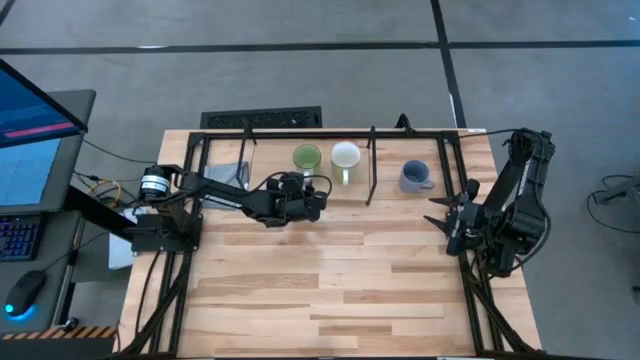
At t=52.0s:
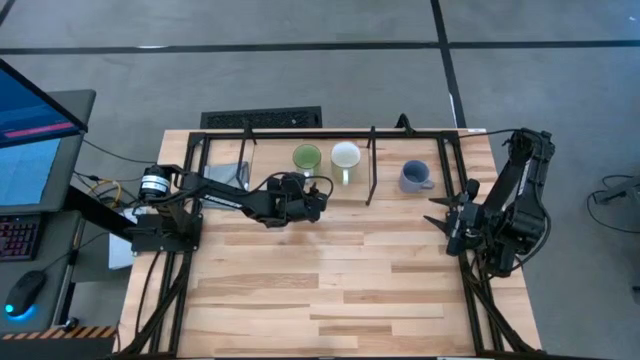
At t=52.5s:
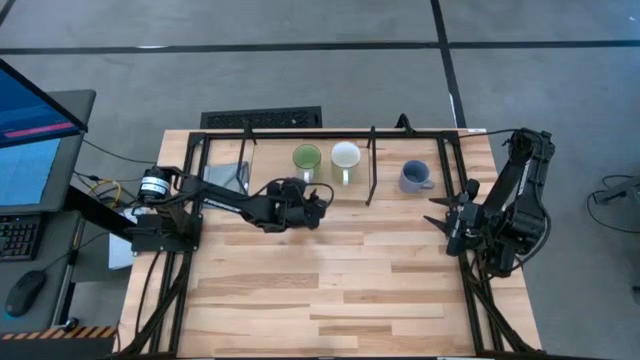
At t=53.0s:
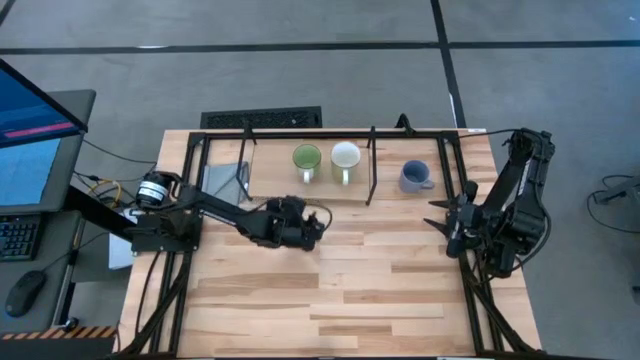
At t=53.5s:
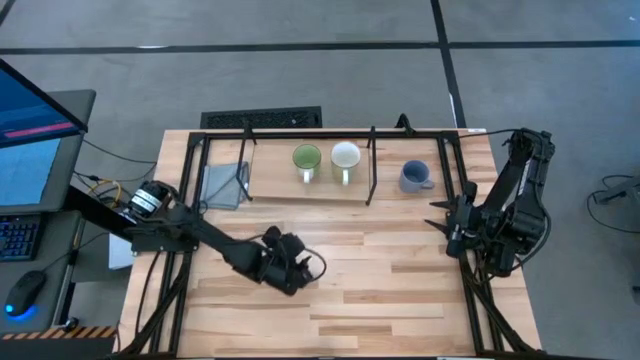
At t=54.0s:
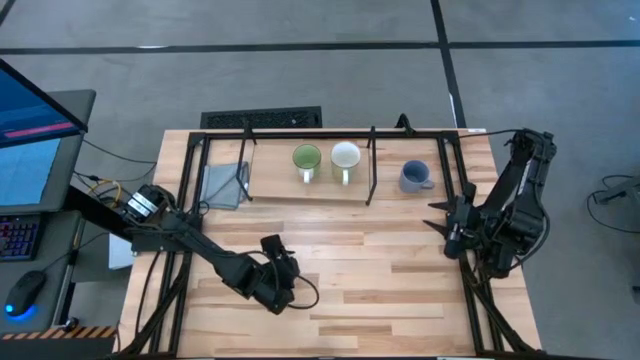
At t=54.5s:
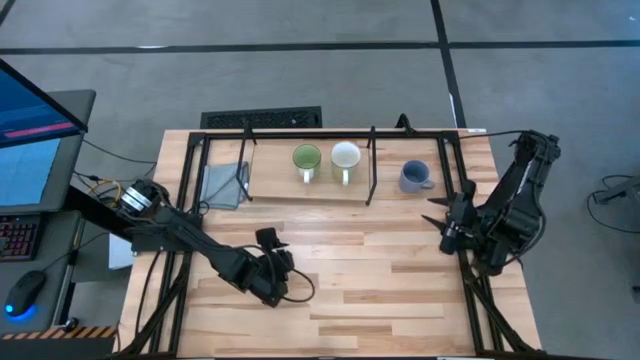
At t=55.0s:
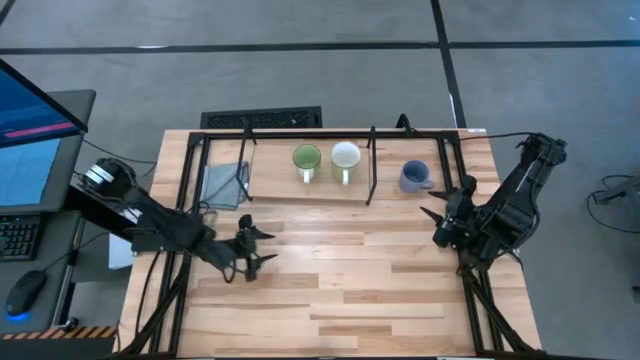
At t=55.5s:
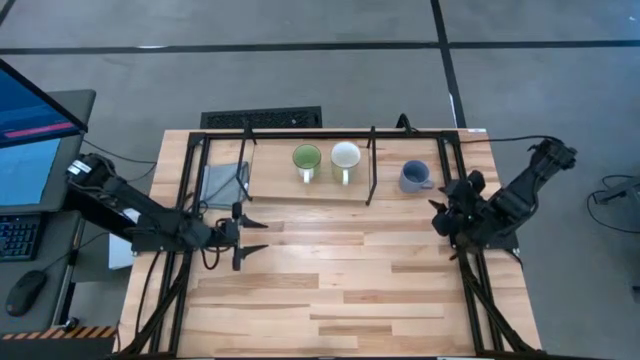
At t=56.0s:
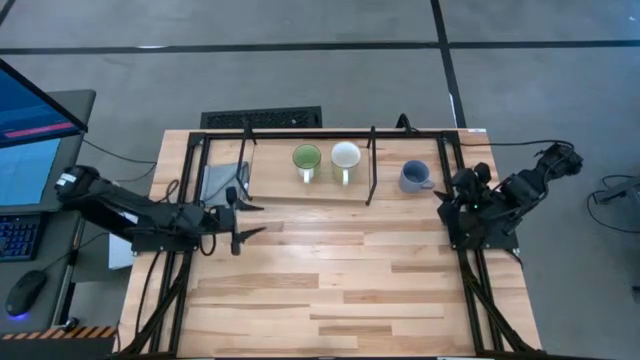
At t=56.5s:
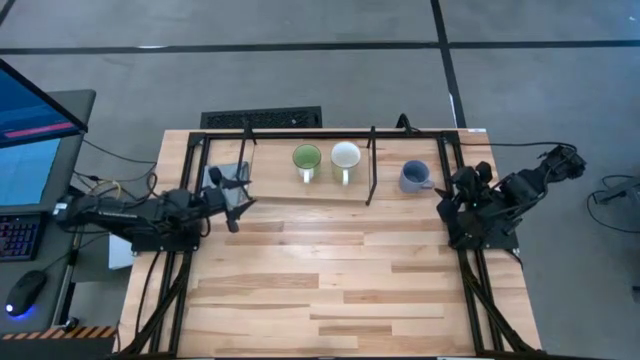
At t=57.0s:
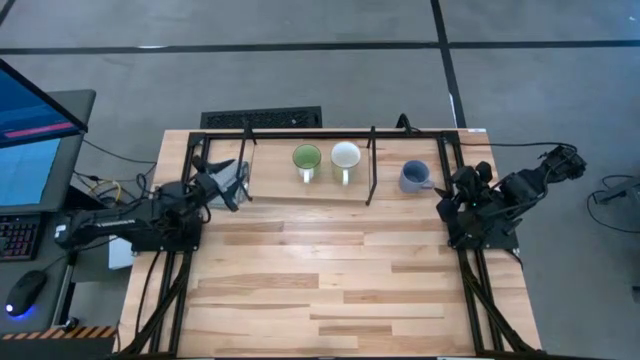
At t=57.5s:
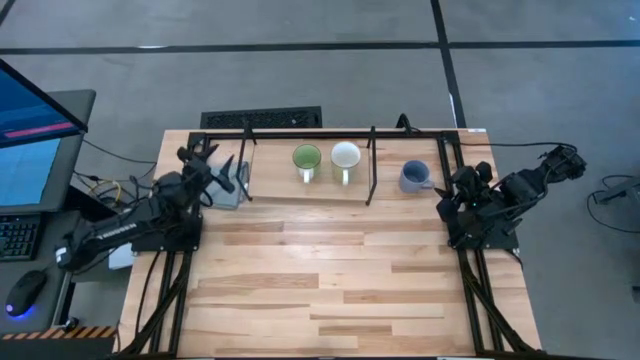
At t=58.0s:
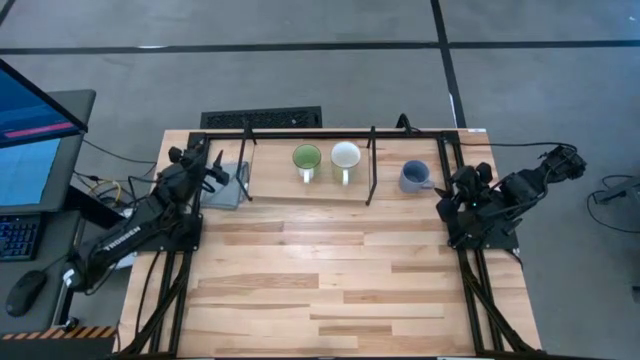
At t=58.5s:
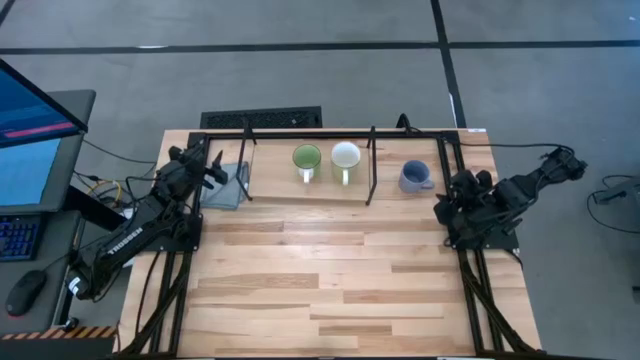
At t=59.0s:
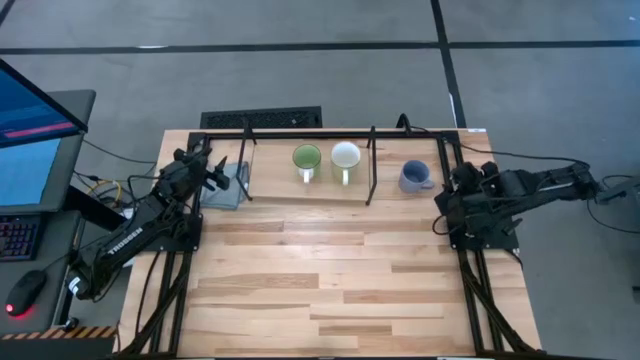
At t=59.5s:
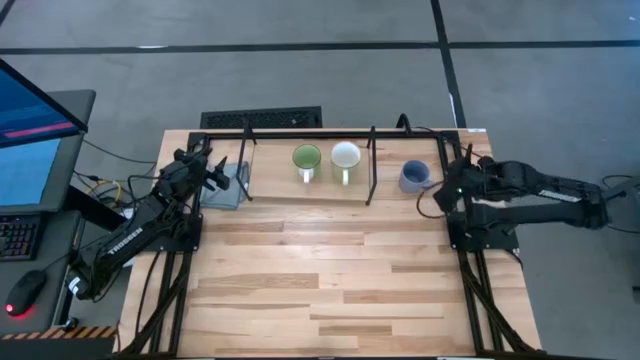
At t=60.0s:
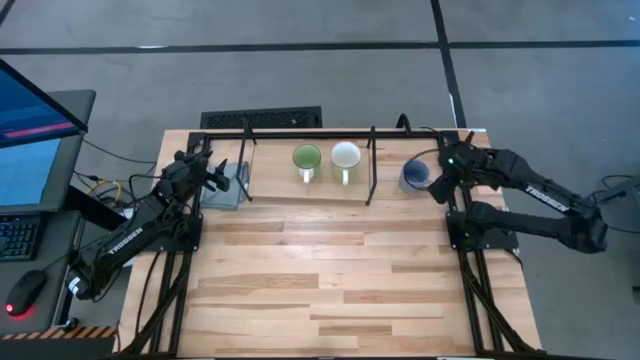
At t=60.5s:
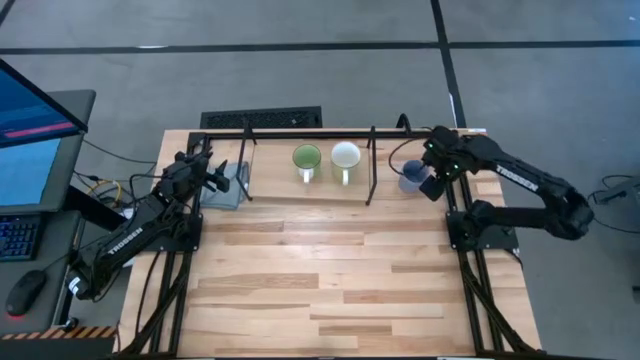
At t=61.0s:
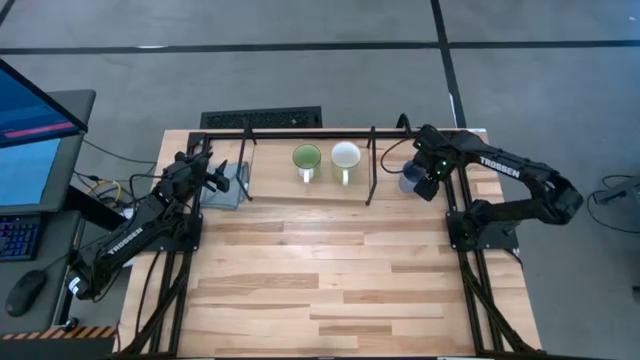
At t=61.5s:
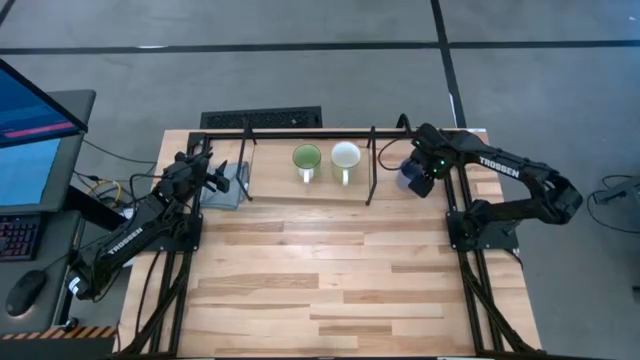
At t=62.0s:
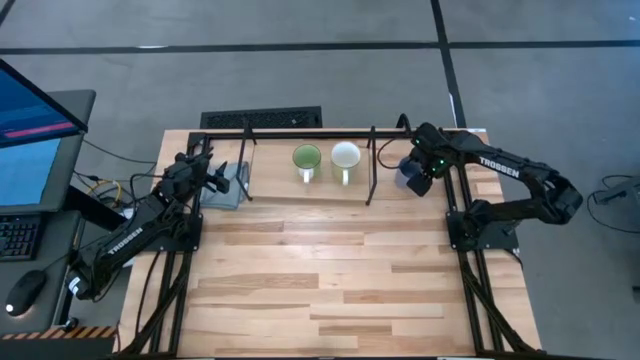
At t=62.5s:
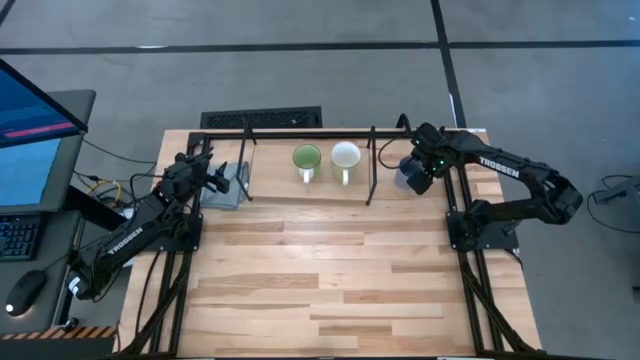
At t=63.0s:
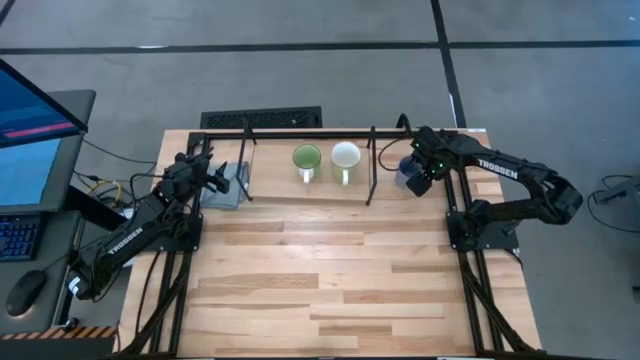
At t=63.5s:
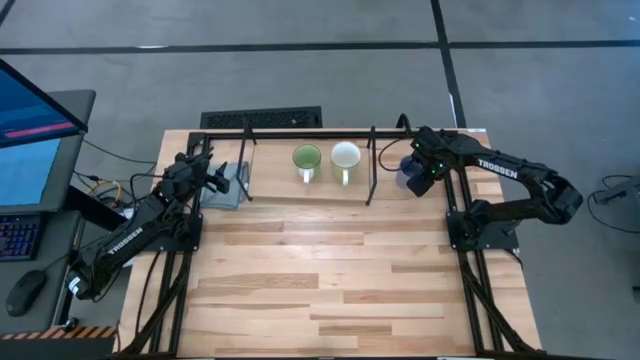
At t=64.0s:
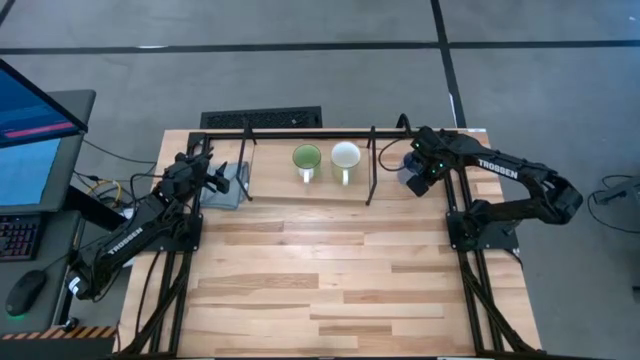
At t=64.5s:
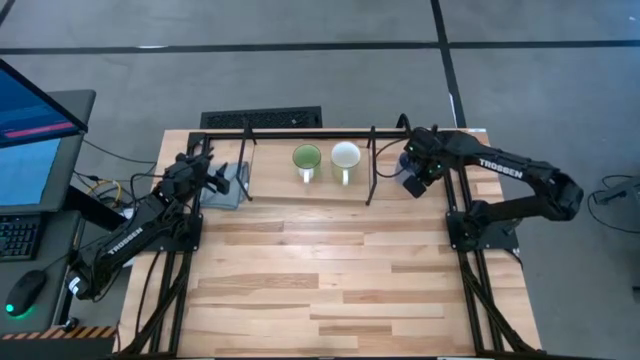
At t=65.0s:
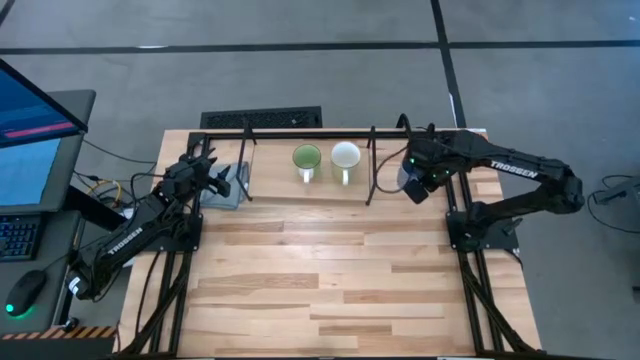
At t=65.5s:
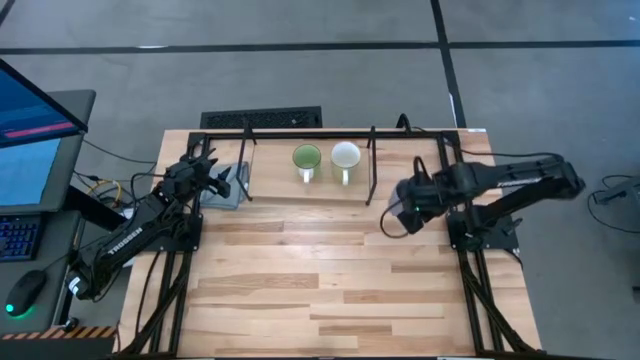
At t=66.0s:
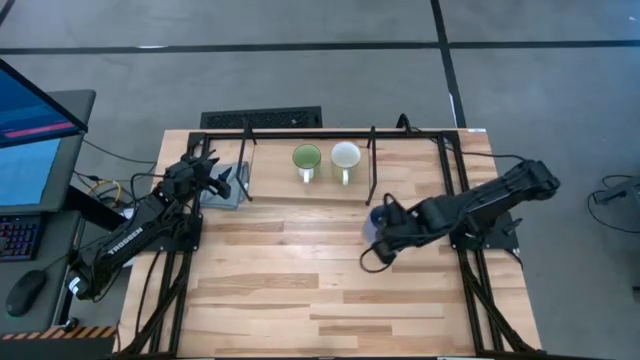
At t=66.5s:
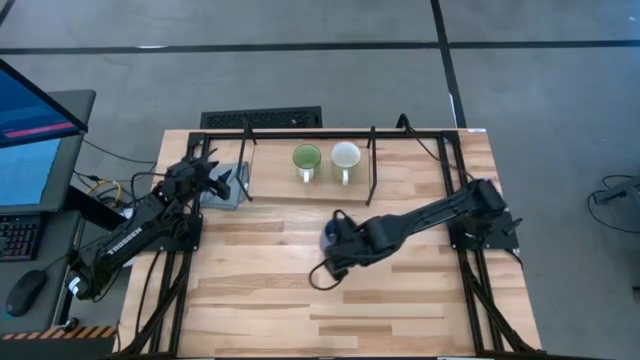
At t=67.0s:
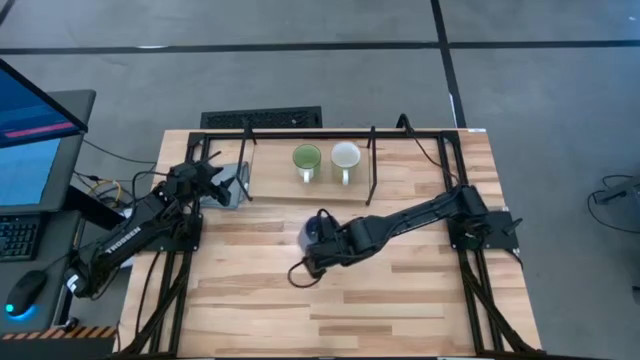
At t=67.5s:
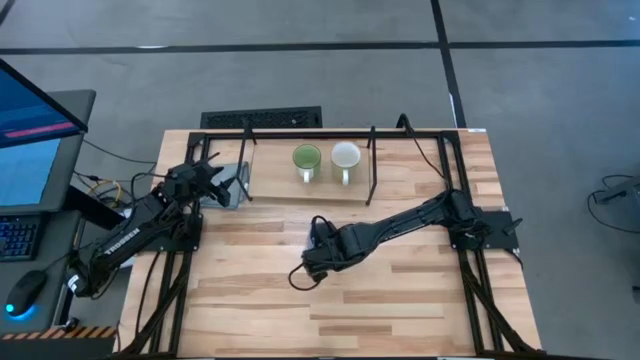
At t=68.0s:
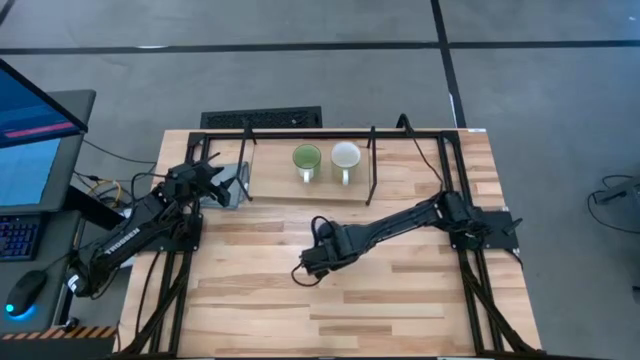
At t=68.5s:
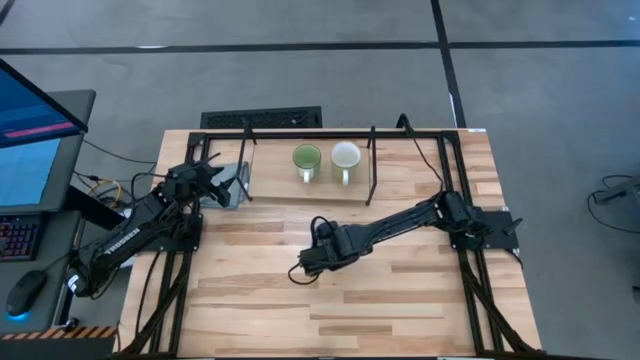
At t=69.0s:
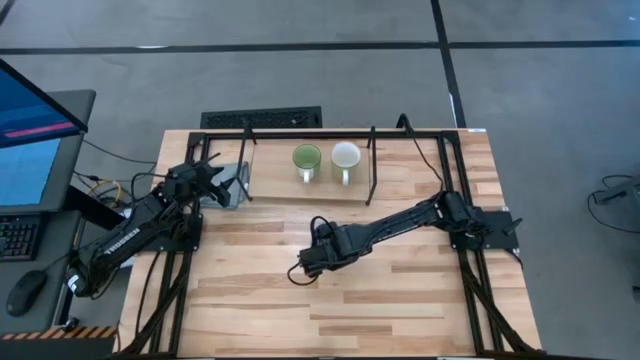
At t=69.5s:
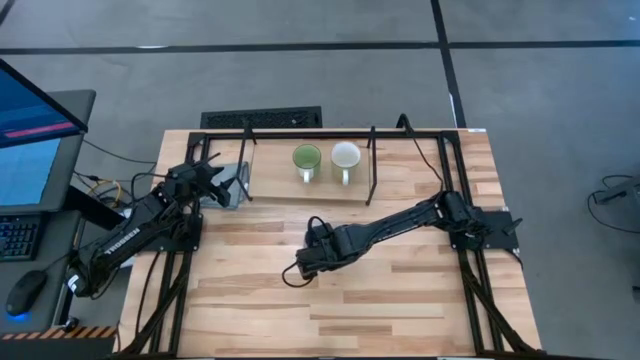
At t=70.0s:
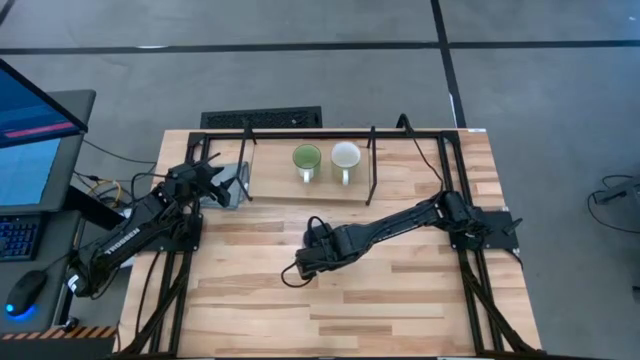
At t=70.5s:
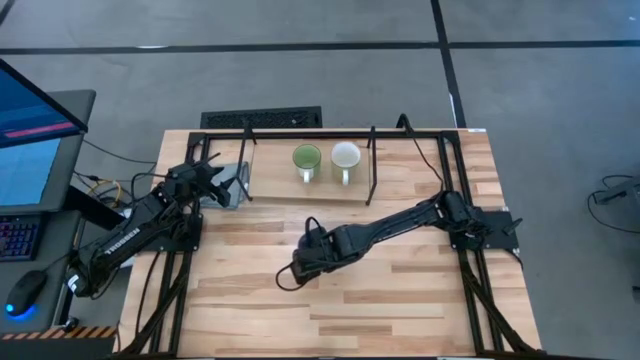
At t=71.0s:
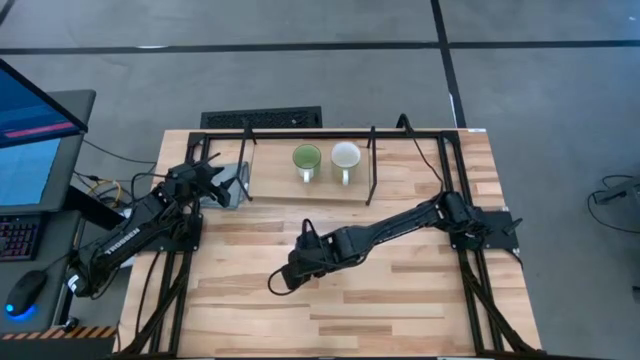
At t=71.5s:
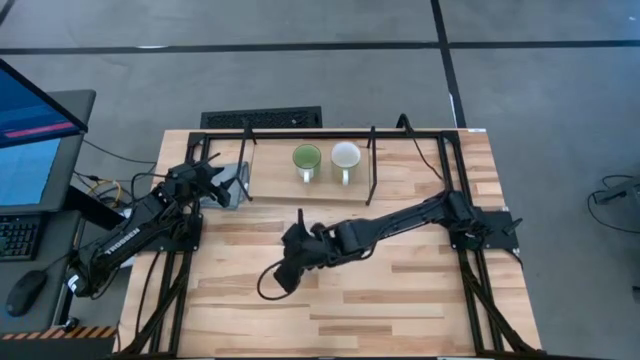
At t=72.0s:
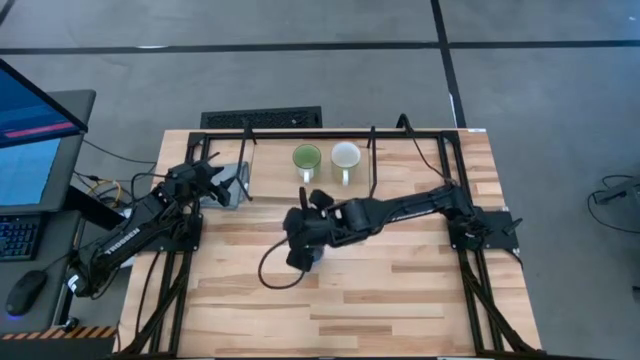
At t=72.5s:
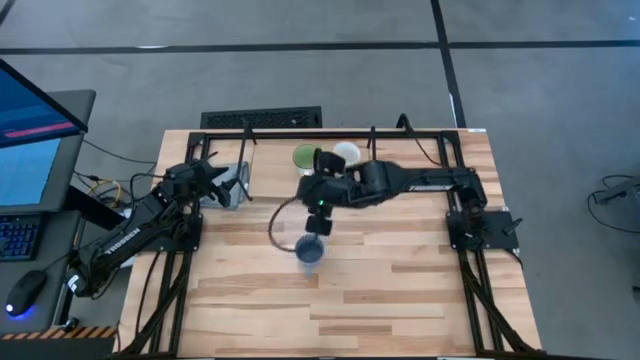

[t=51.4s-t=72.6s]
Task: Stack small to large cups/mugs on shelf
Put the blue mug on the shelf
